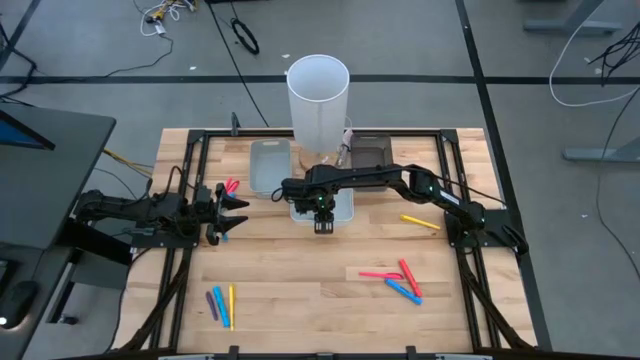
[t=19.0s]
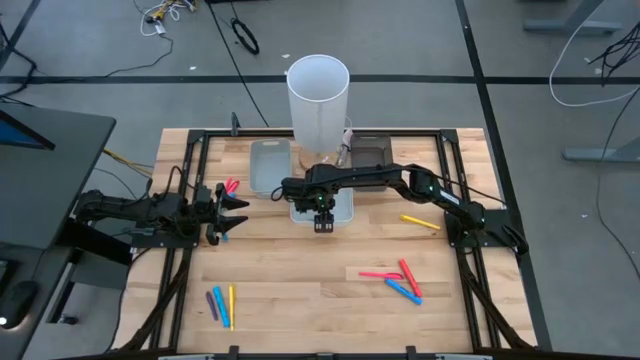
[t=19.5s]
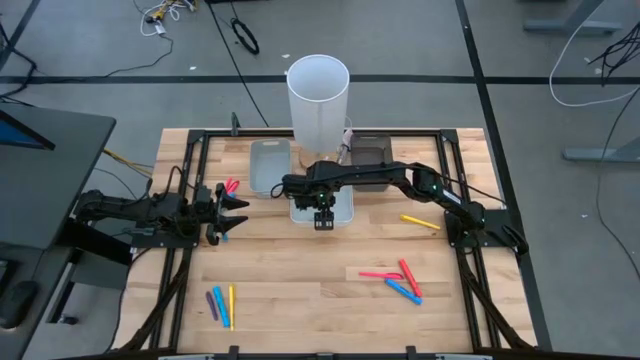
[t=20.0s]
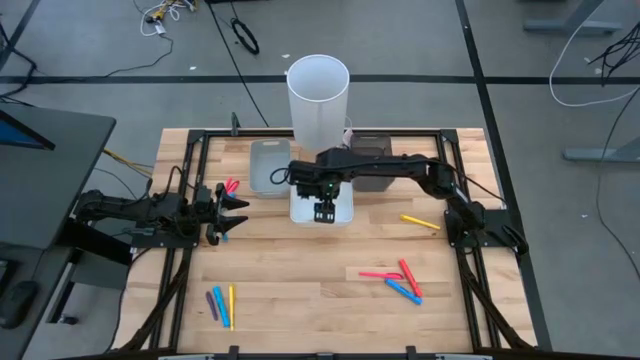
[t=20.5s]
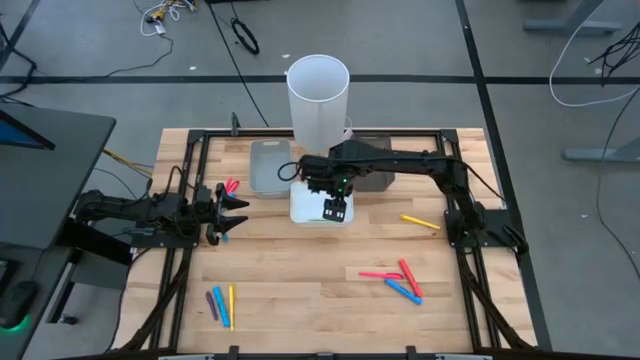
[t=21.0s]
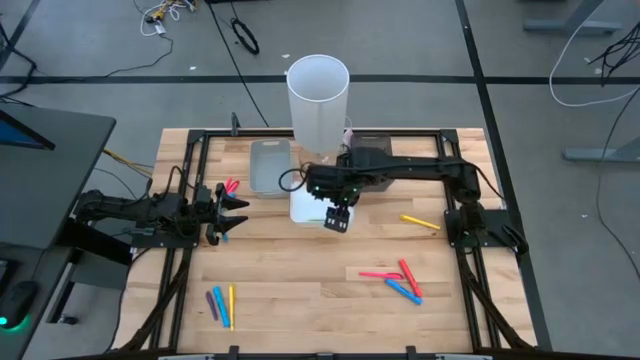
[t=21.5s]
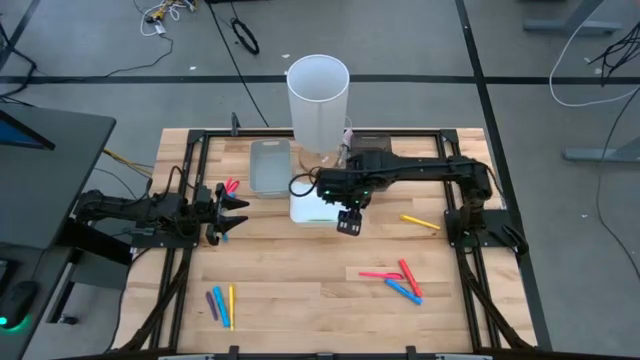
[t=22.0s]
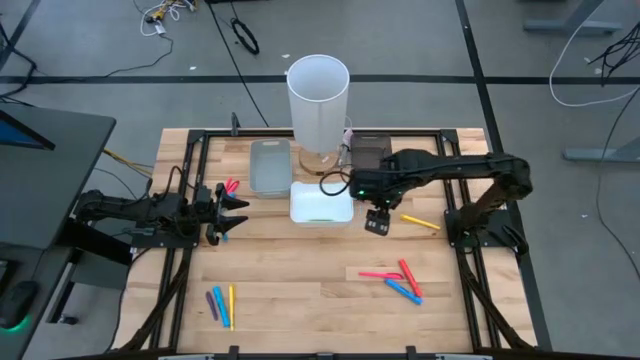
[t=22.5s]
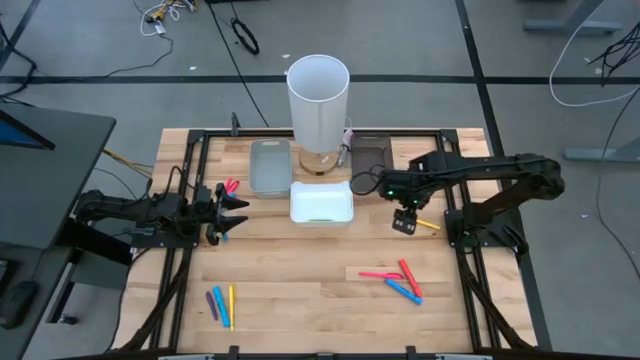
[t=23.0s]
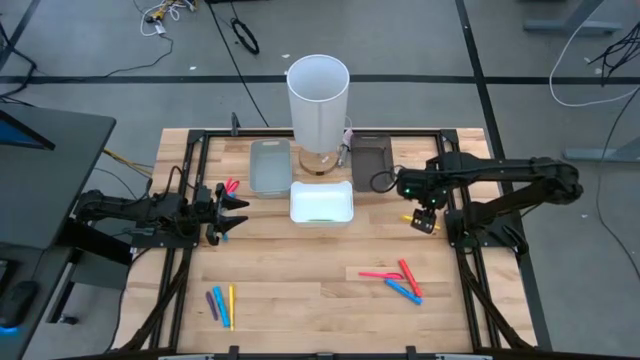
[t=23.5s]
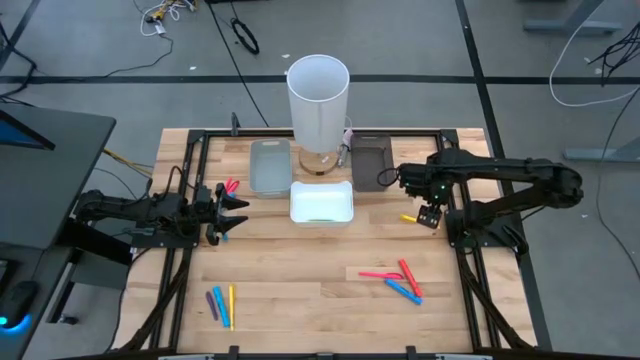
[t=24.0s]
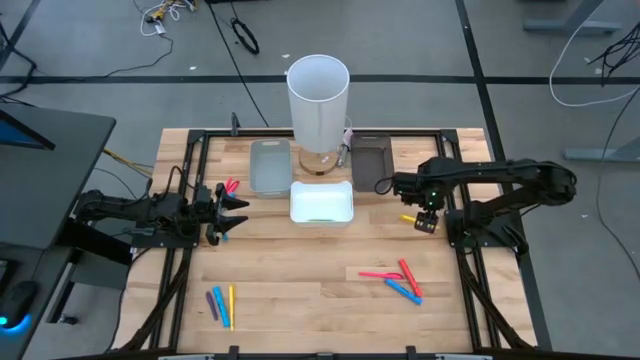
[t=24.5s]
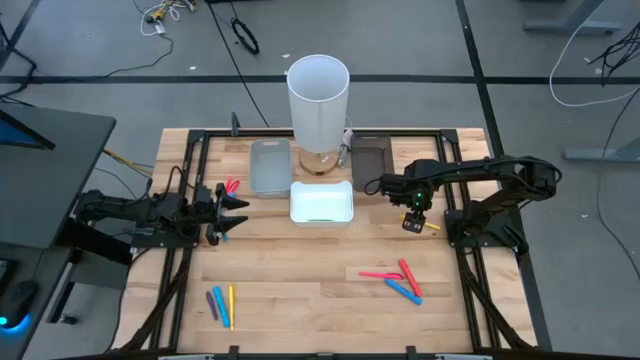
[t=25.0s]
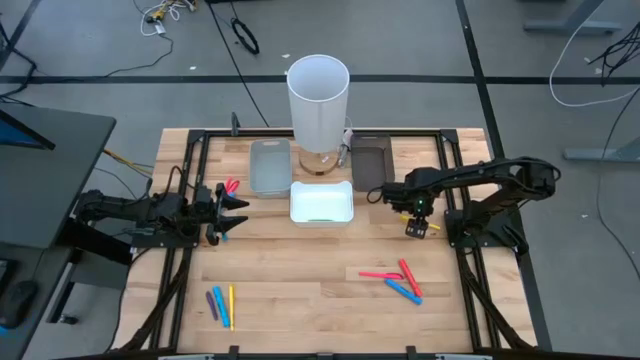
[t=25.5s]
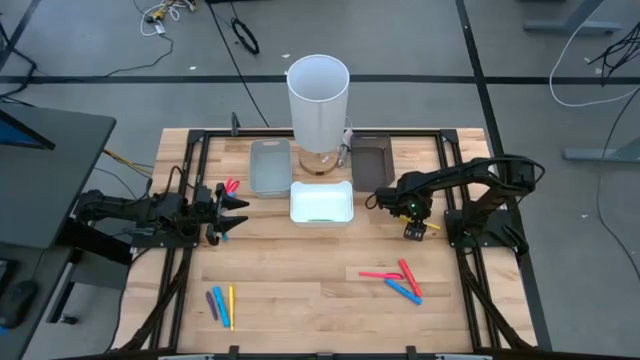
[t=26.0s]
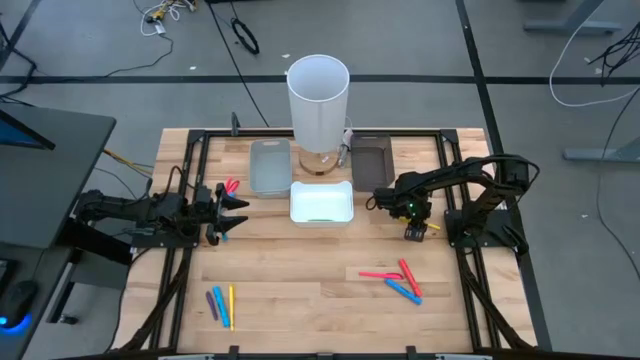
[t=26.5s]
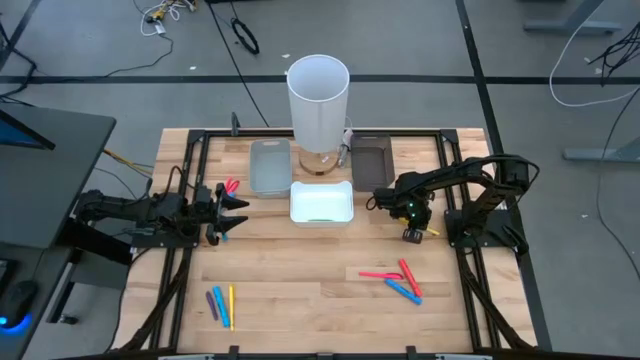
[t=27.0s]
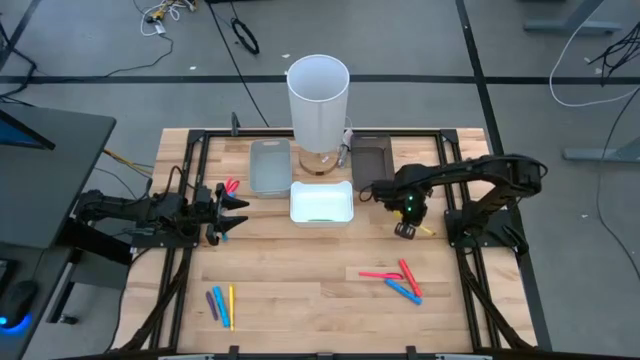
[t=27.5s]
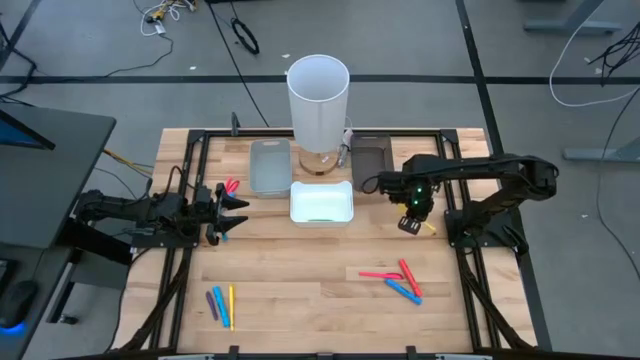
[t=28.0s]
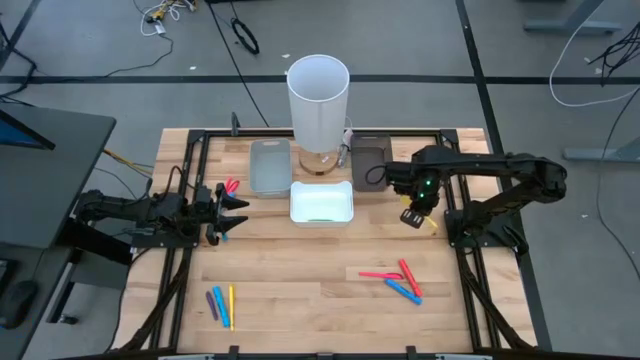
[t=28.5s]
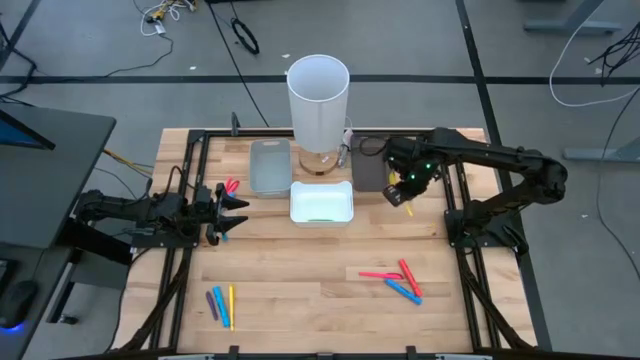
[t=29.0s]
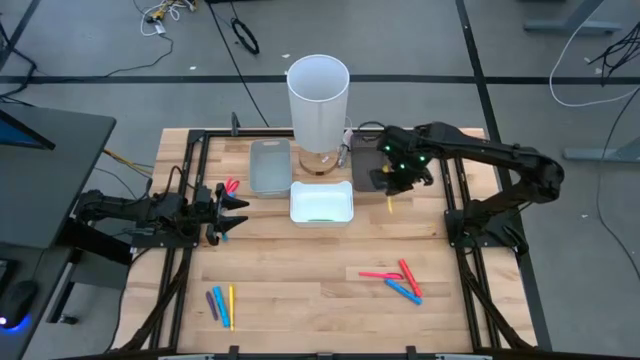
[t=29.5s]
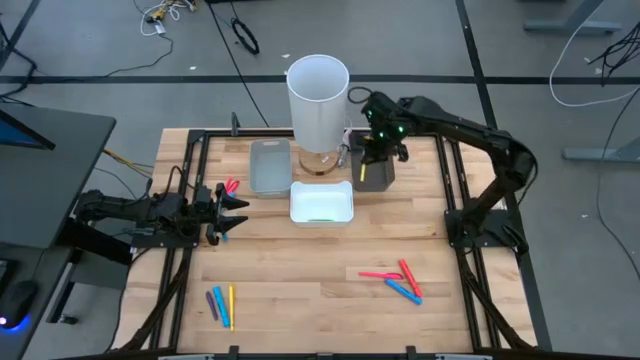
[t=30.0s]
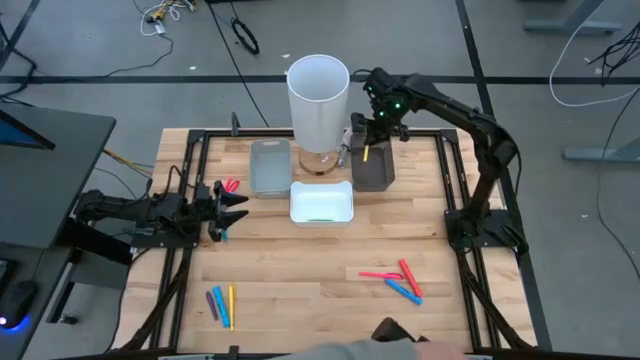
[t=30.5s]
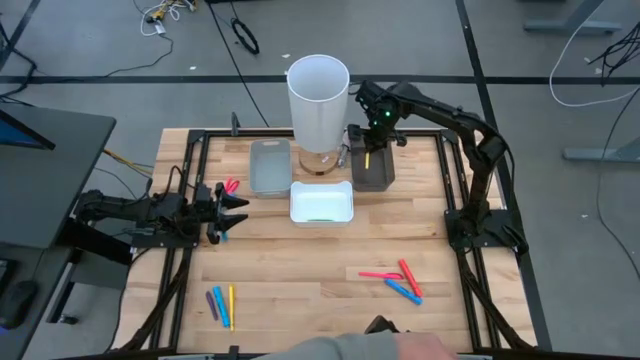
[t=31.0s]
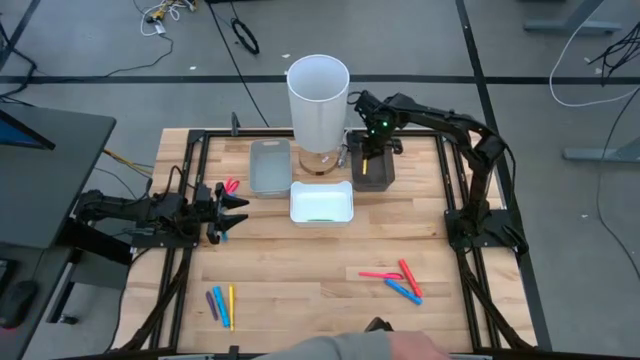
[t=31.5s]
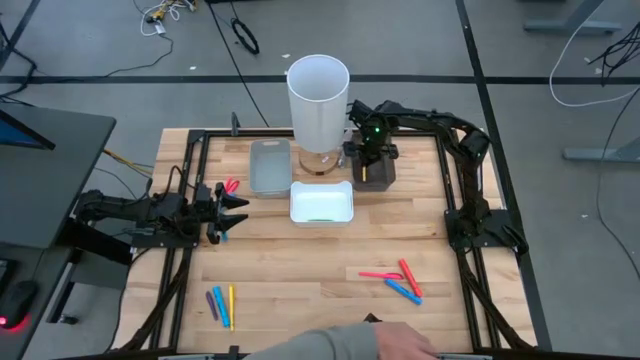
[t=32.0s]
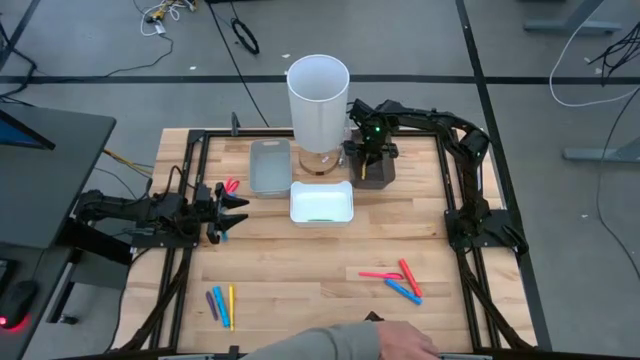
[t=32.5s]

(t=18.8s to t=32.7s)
Task: Pick & Place Markers
Put the top right yellow marker pen into the black bin

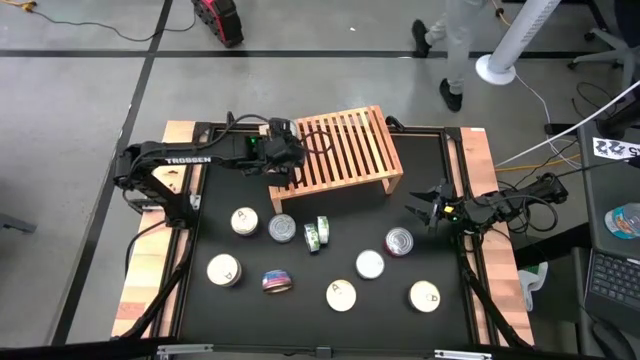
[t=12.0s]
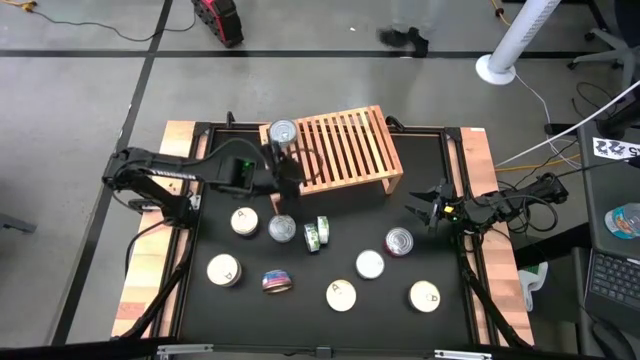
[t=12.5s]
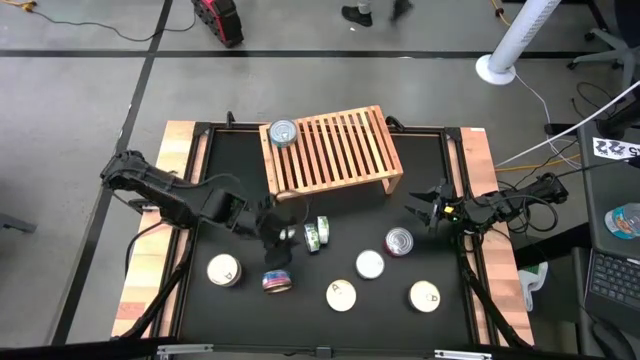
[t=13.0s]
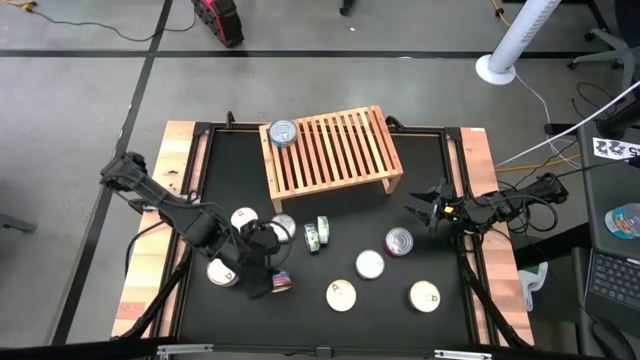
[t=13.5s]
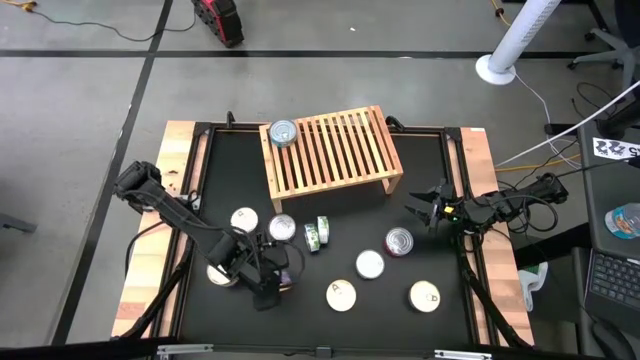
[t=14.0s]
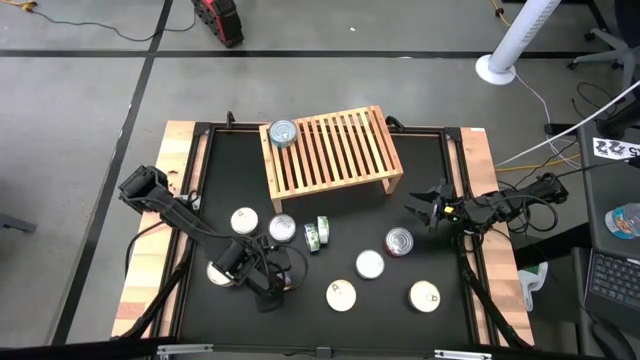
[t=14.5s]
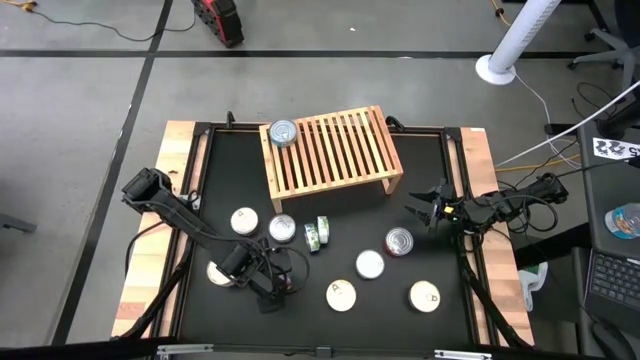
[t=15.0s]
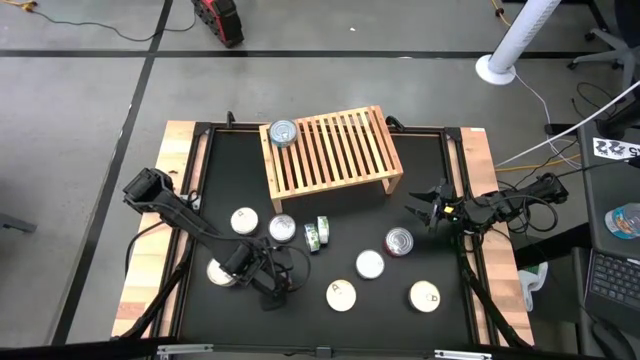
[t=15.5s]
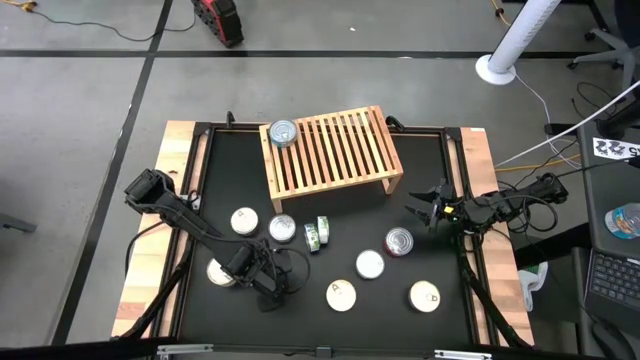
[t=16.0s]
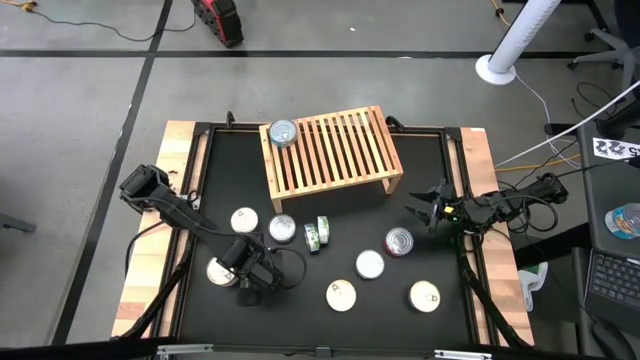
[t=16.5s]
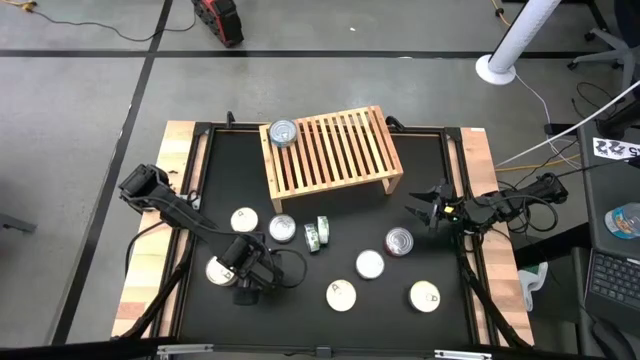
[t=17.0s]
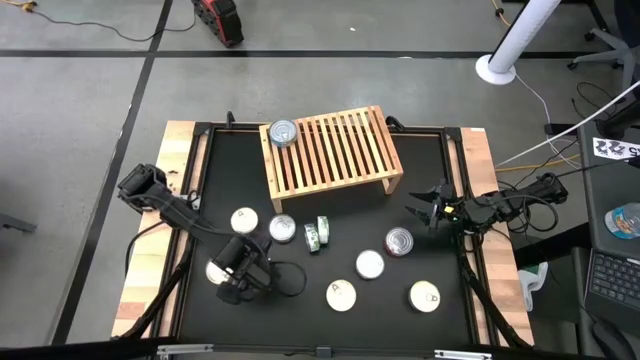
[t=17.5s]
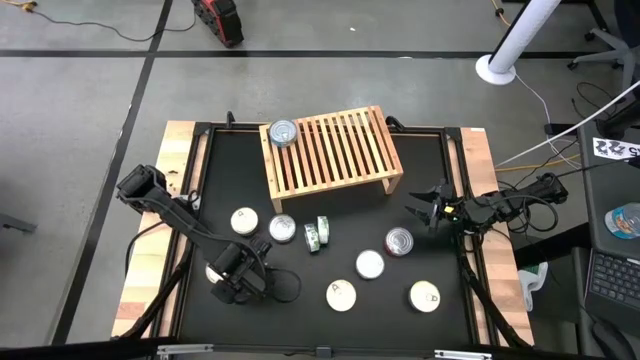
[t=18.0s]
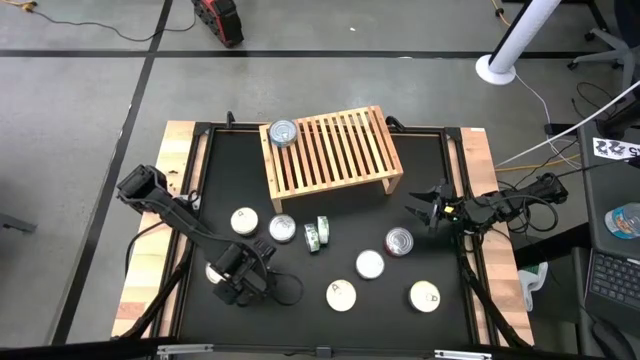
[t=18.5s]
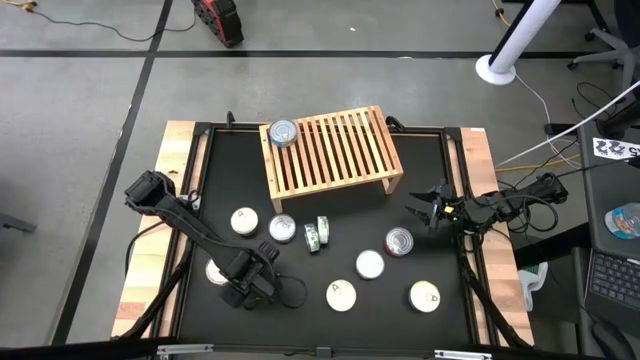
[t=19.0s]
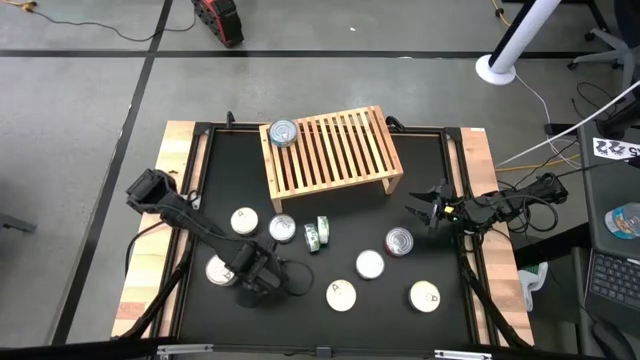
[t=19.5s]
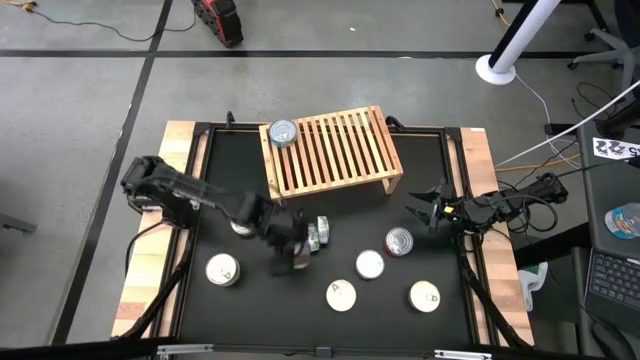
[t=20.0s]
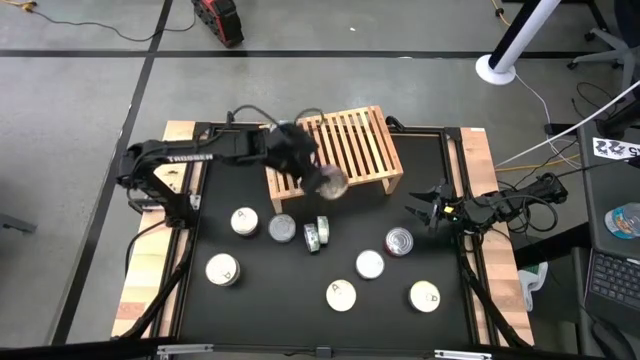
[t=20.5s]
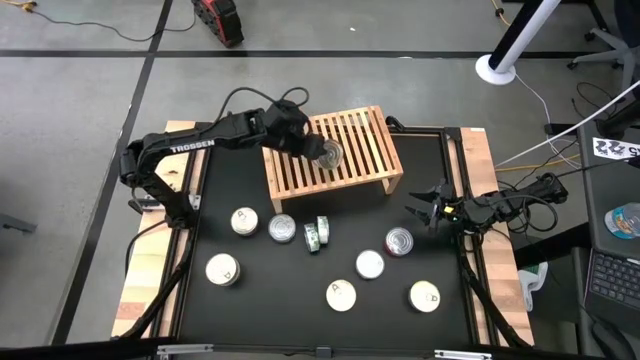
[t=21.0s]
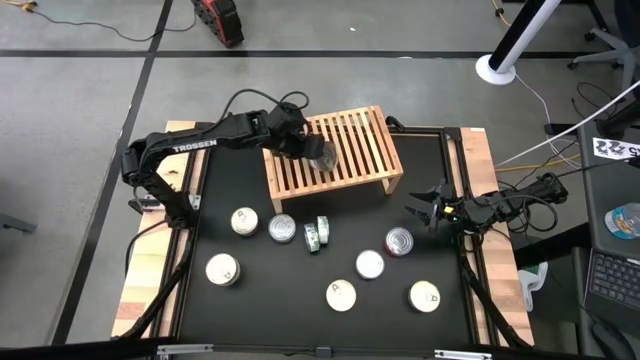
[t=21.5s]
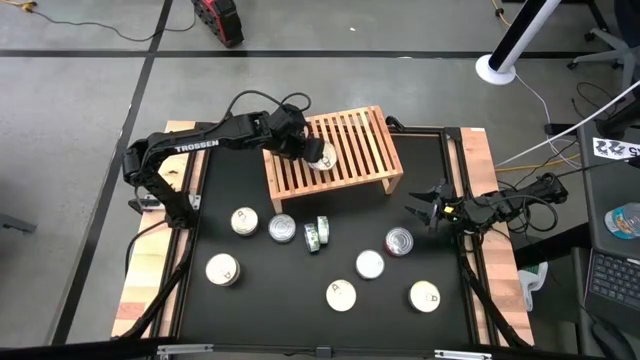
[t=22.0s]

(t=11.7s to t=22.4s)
Task: Stack canned seafood by type on shelf
Put the blue tuna can on the shelf
